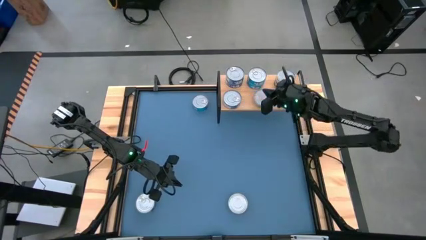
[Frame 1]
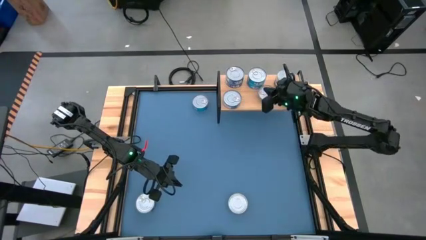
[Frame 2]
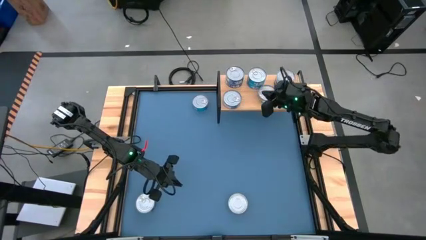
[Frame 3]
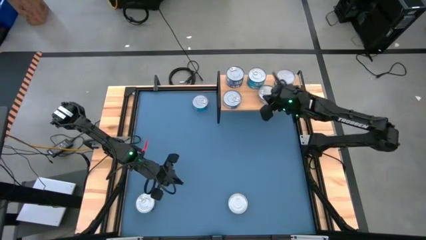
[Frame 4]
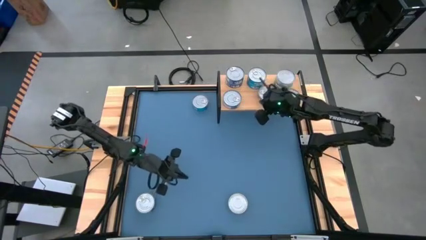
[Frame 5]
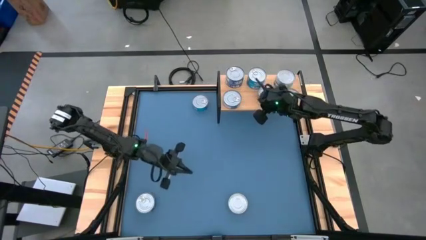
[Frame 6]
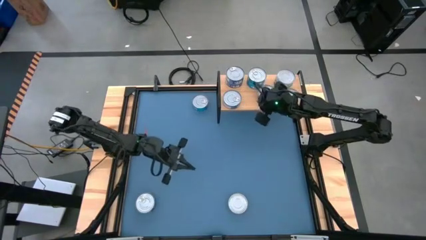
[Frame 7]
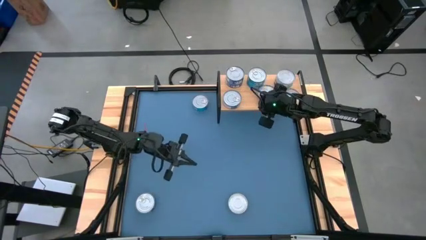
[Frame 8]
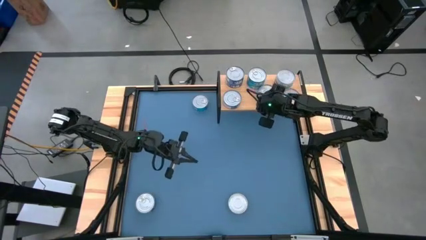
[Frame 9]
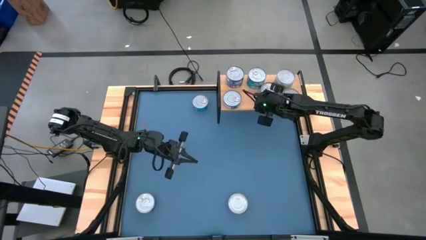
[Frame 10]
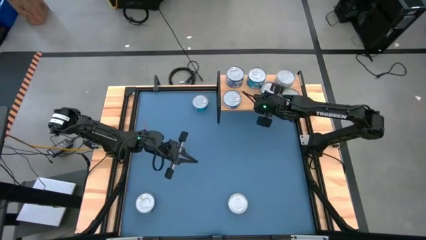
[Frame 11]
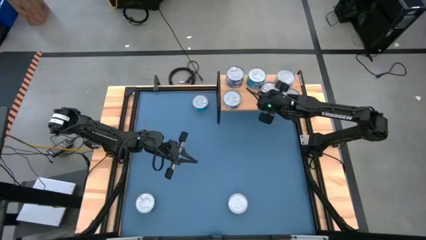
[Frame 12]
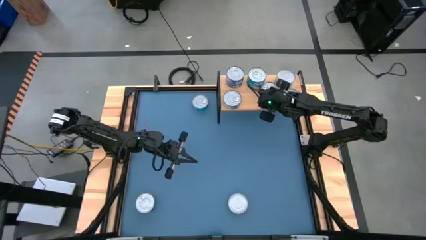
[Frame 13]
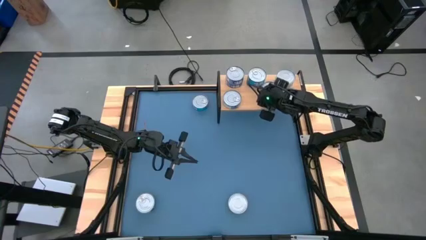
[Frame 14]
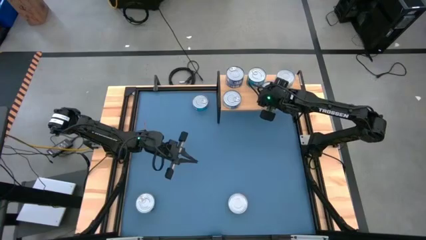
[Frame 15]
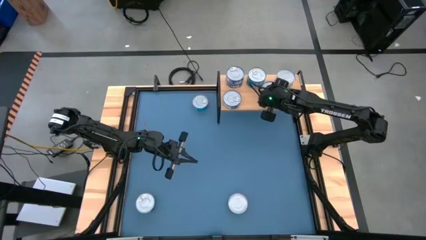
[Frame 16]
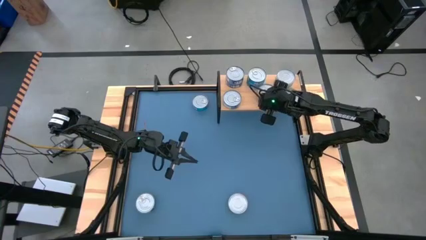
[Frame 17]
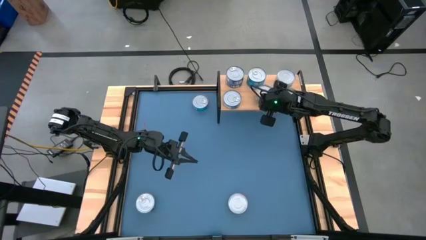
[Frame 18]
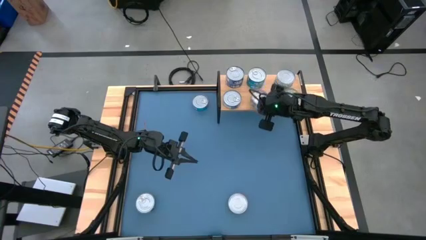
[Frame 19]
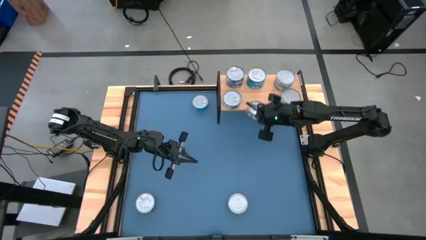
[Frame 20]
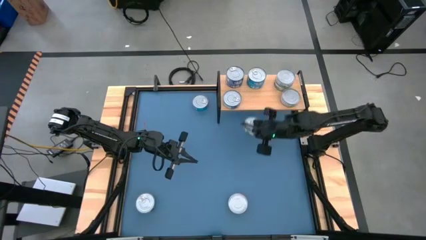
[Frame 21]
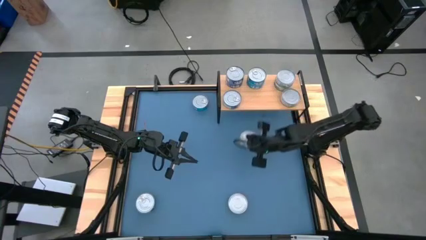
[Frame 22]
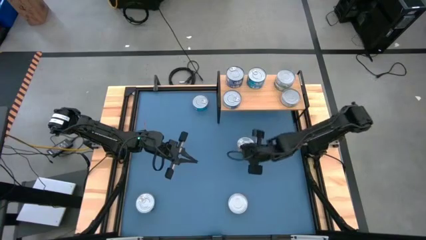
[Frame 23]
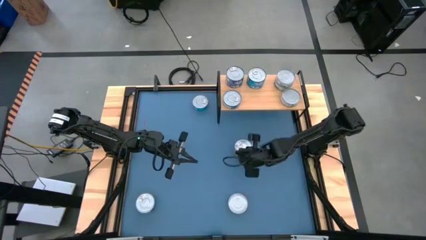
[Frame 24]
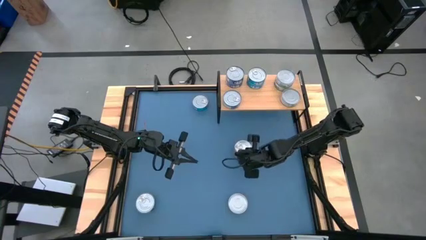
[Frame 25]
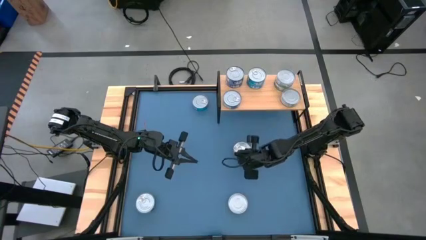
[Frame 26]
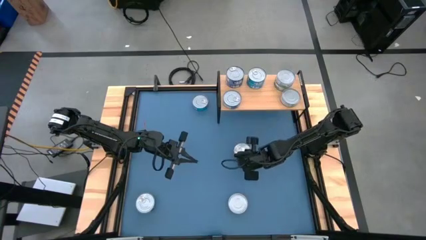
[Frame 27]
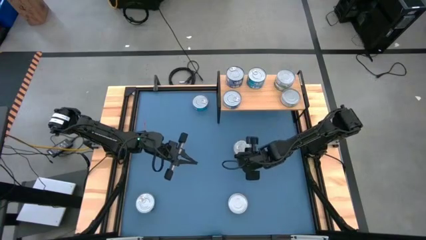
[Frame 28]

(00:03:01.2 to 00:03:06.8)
Task: Stack canned seafood by type on shelf
Remove the front light blue tuna can from the shelf

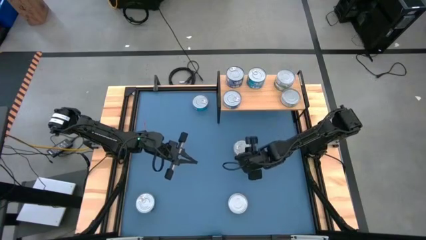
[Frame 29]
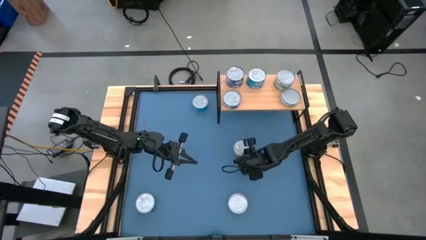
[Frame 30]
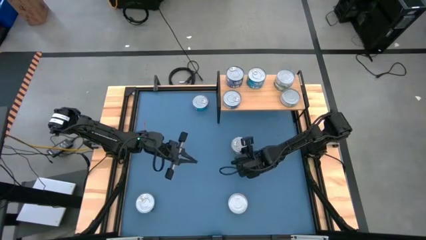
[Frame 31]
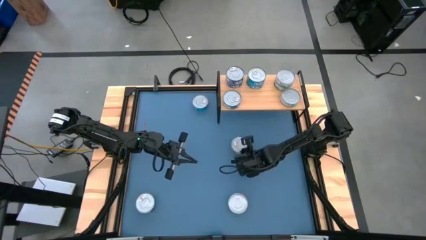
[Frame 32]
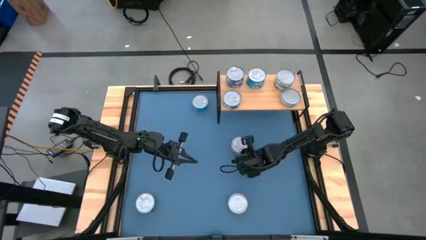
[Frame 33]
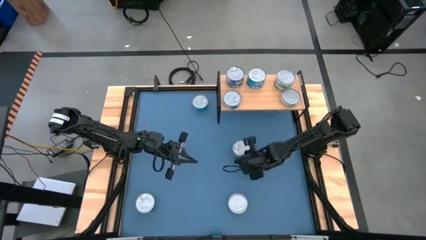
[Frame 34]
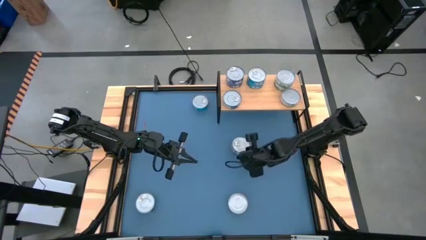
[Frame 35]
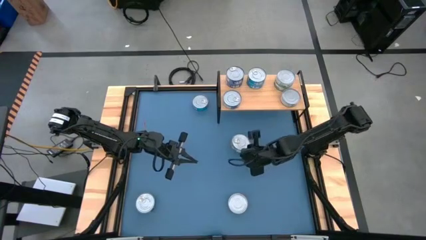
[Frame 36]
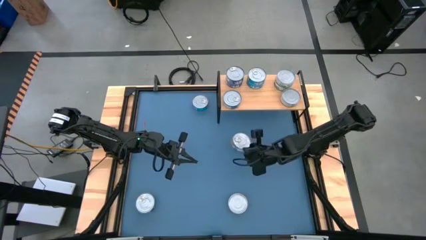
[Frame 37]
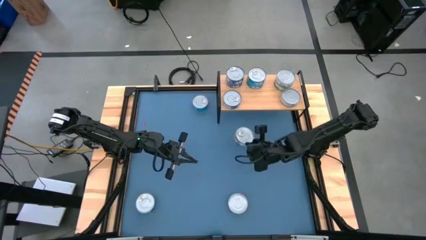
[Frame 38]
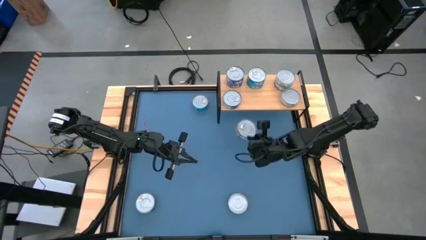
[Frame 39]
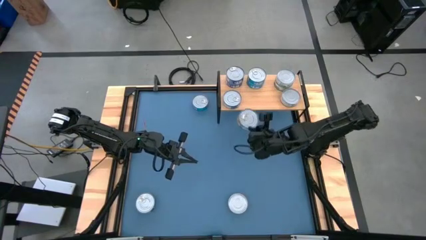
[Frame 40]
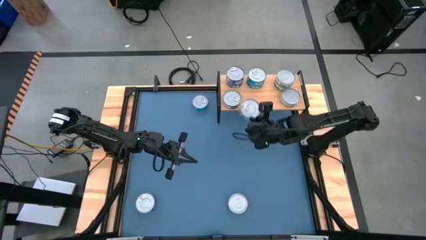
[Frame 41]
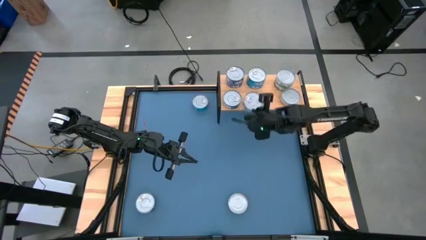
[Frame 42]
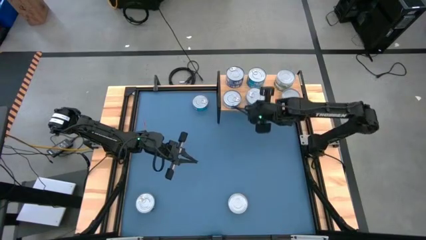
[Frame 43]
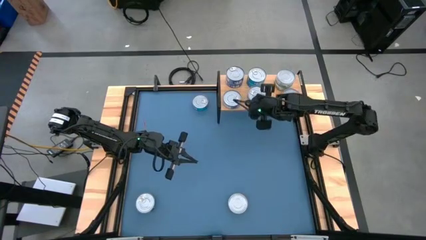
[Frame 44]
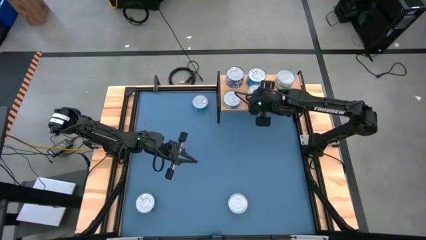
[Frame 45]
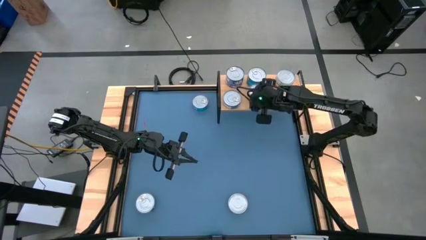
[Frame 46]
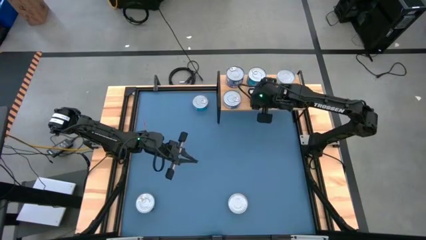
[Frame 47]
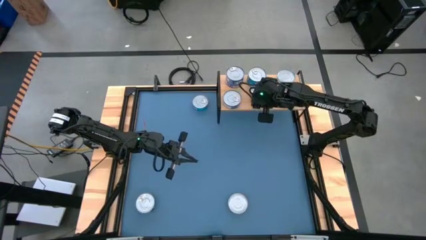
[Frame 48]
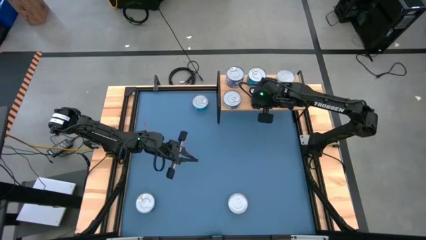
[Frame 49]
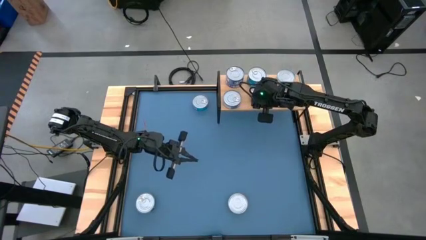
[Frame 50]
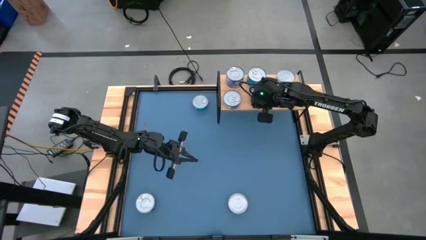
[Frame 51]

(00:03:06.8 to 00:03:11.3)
Put the center light blue tuna can on the shelf and align it with the other light blue tuna cans

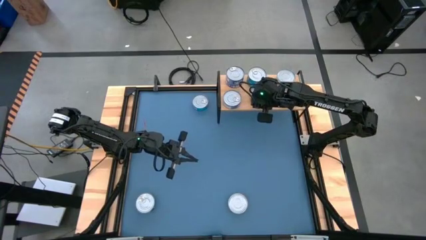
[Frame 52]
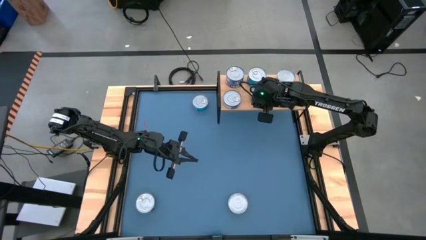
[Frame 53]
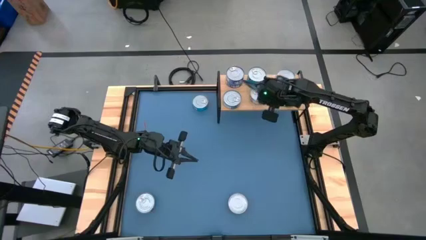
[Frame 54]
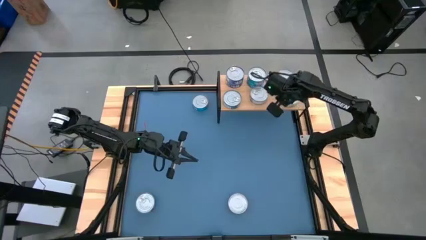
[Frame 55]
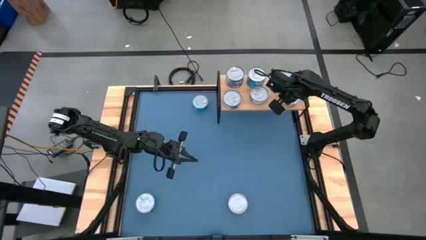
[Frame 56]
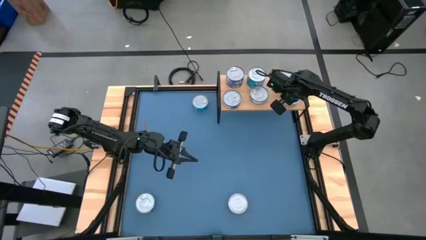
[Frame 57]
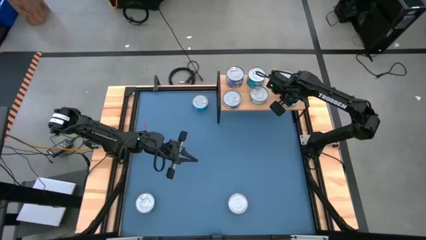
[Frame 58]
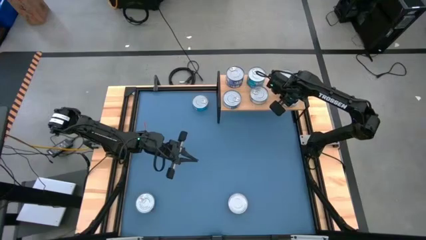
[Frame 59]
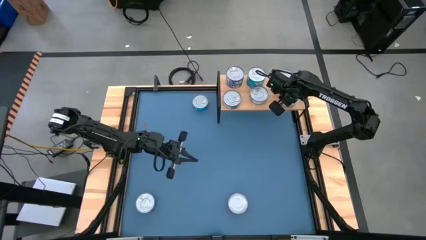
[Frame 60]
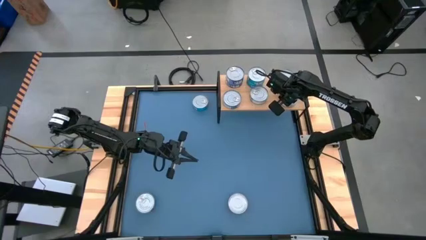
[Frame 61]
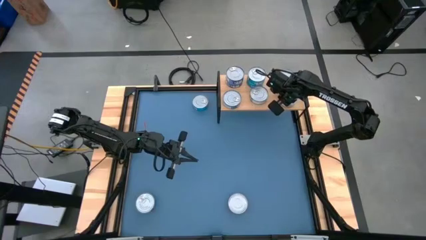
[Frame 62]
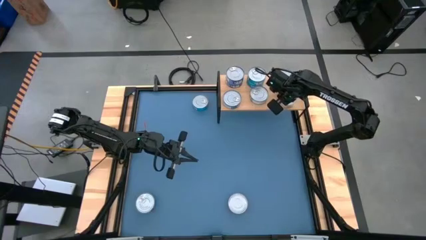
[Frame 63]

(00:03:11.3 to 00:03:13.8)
Adjust the front green tuna can on the shelf

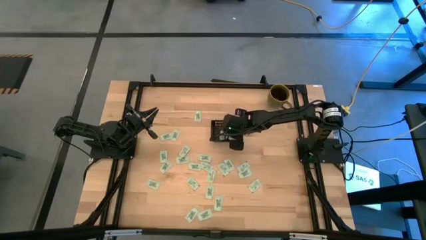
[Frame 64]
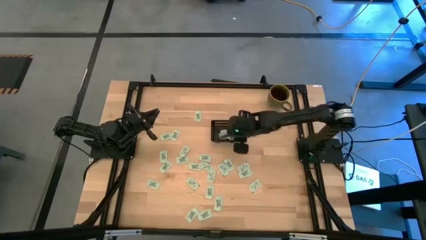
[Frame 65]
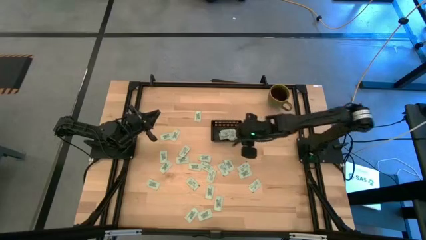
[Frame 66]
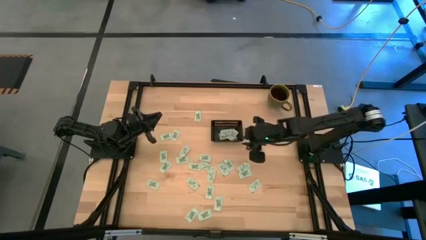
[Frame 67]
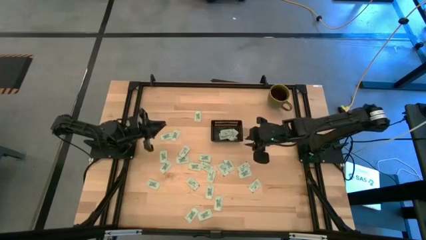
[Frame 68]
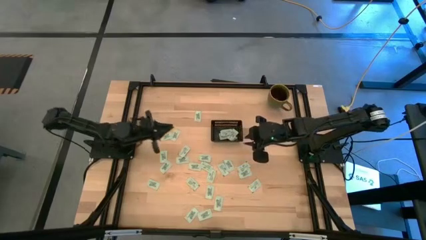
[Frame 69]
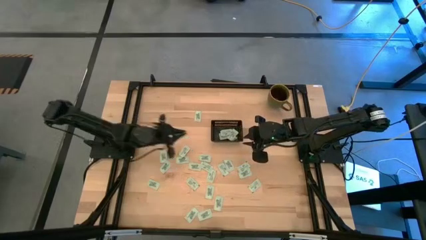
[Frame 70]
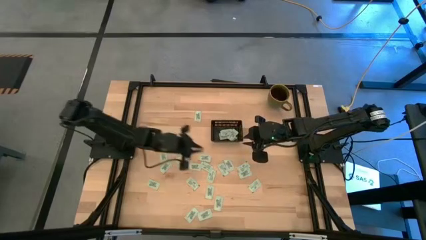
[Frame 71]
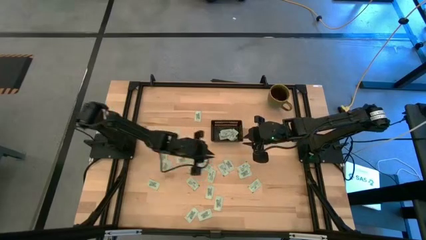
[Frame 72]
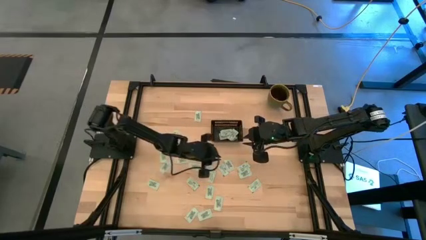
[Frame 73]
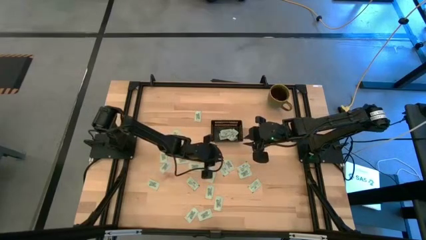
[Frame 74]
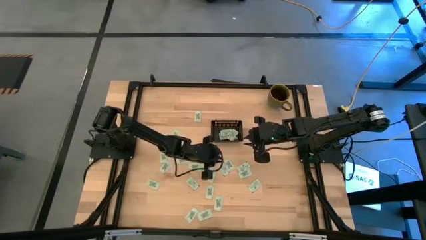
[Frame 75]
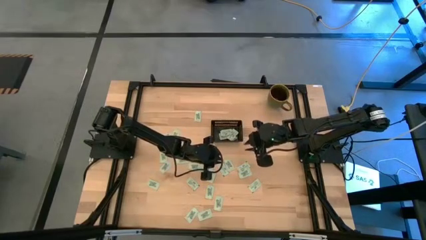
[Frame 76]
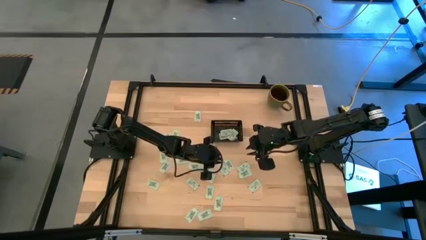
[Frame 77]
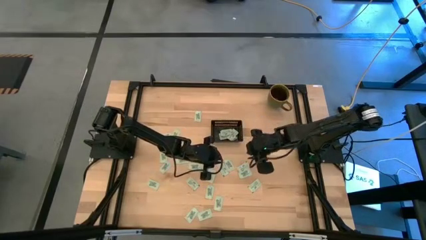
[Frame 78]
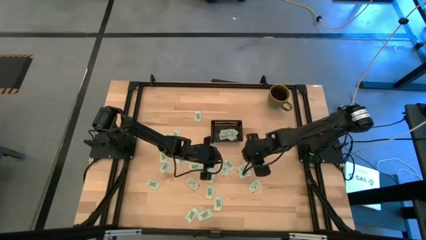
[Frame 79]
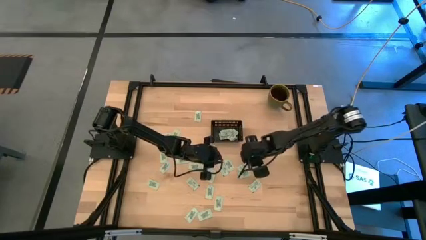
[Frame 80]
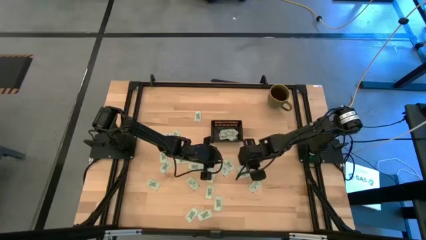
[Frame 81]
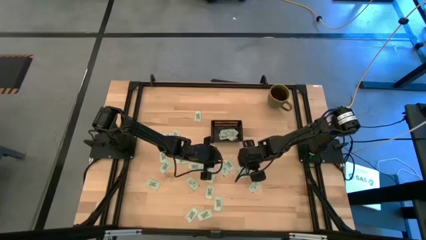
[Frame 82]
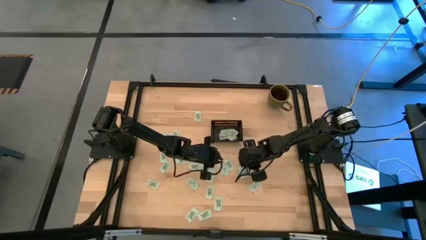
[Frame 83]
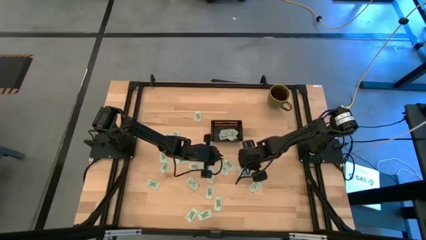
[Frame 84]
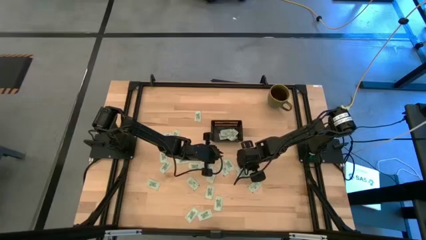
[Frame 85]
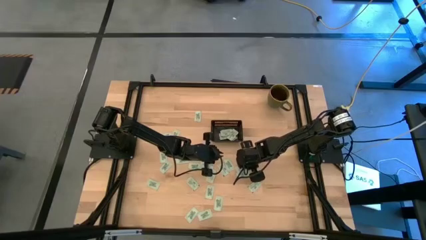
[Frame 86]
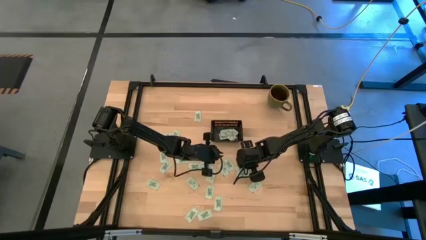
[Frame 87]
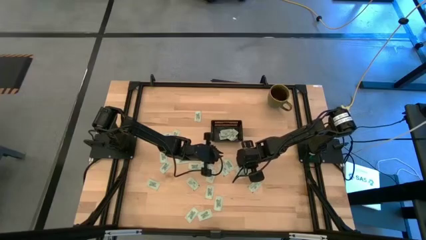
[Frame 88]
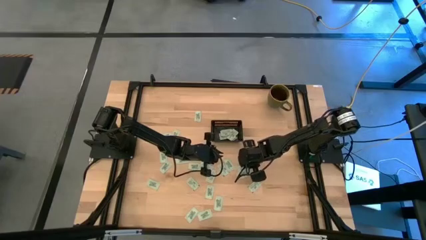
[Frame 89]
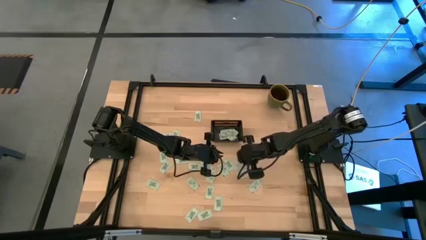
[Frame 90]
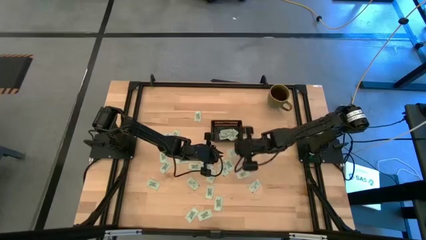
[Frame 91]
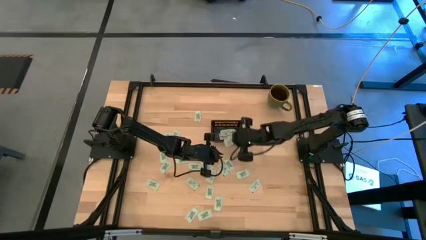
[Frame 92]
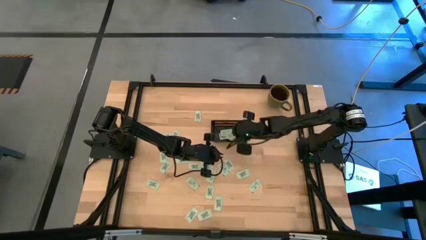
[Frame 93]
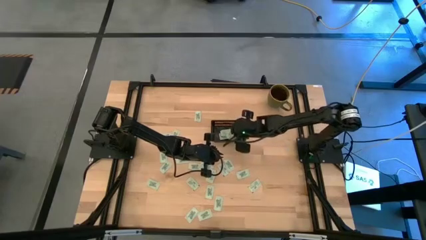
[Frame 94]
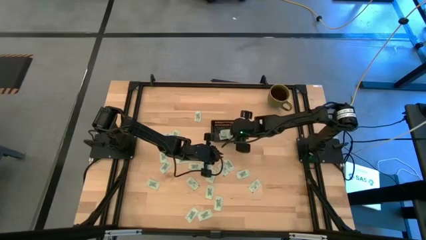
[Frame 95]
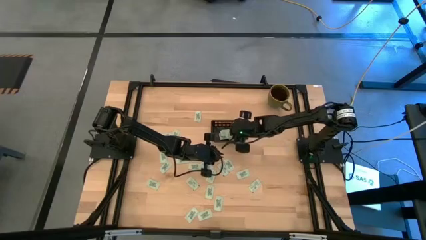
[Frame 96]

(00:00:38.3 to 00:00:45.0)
Task: Pick and place Stevia / Truvia into bins
Put the stevia packet into the black basket
